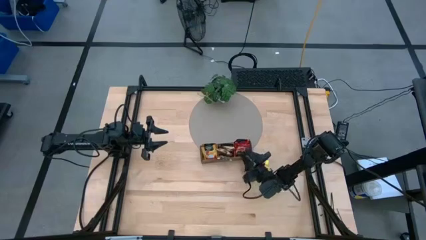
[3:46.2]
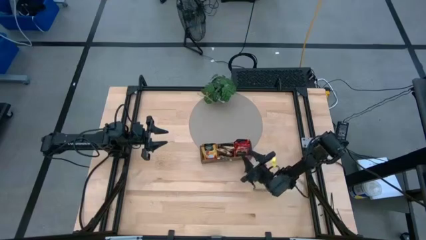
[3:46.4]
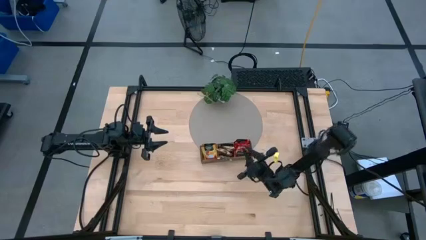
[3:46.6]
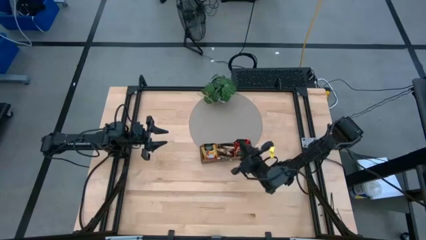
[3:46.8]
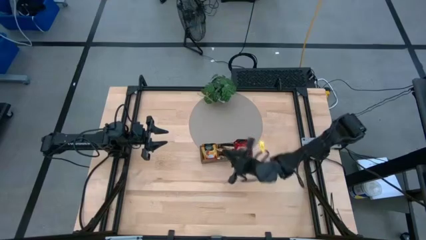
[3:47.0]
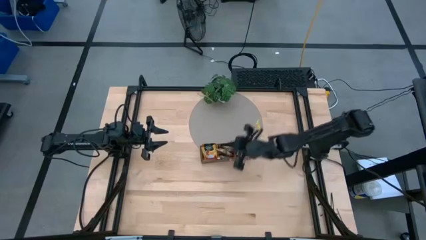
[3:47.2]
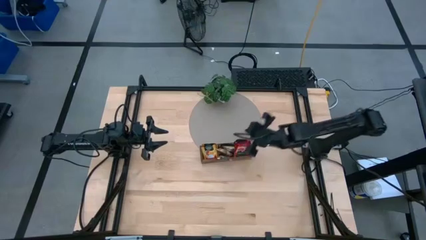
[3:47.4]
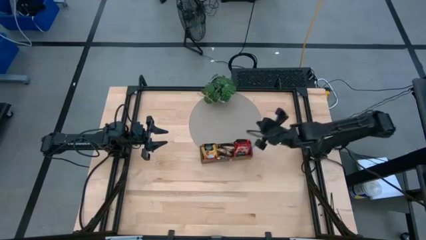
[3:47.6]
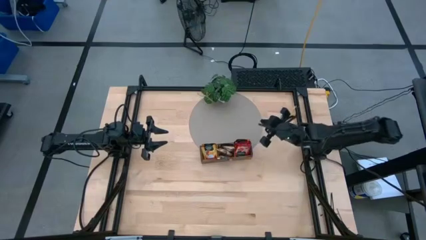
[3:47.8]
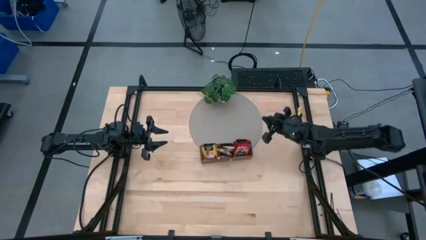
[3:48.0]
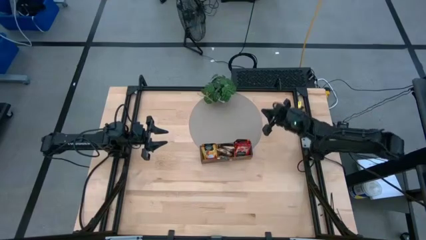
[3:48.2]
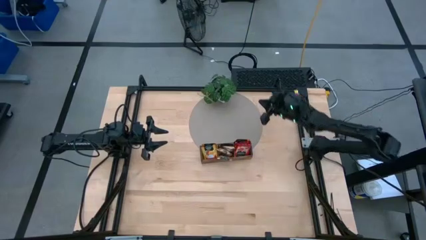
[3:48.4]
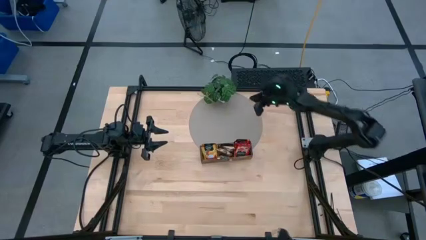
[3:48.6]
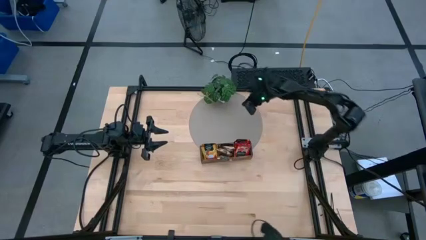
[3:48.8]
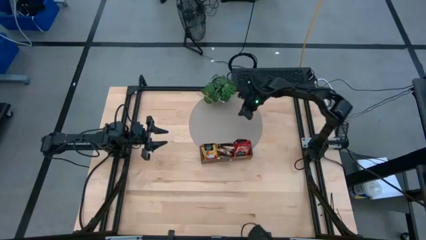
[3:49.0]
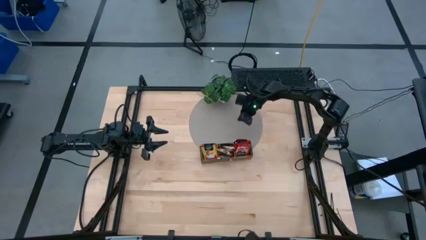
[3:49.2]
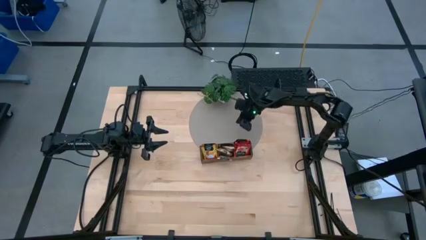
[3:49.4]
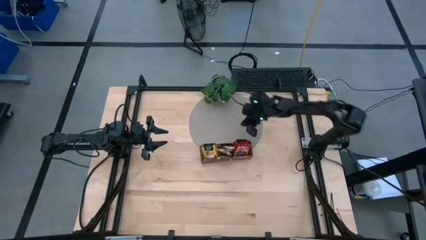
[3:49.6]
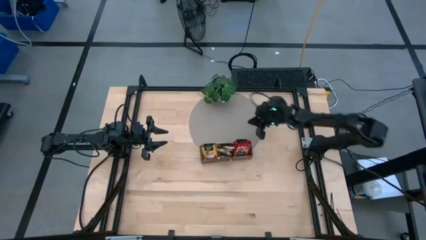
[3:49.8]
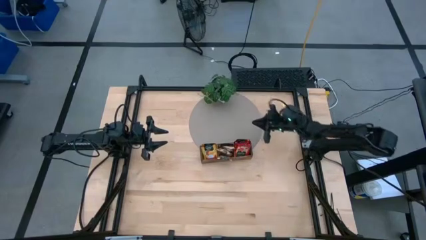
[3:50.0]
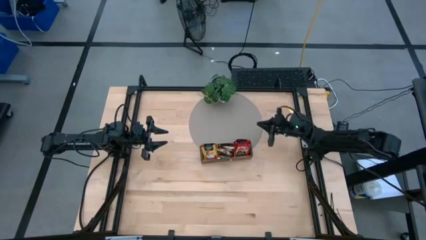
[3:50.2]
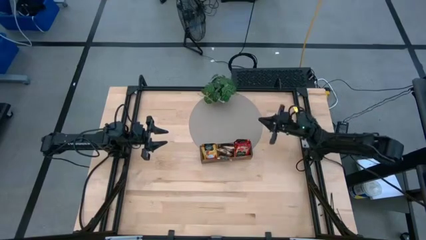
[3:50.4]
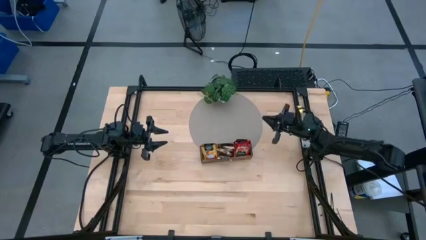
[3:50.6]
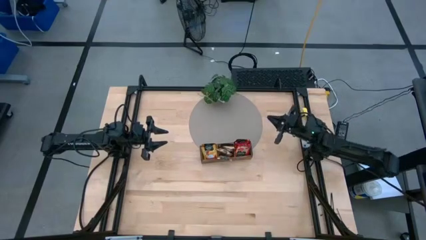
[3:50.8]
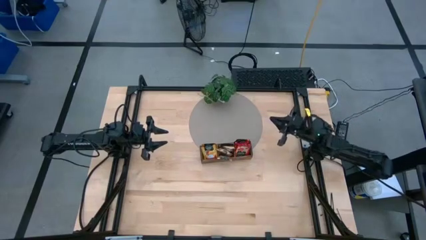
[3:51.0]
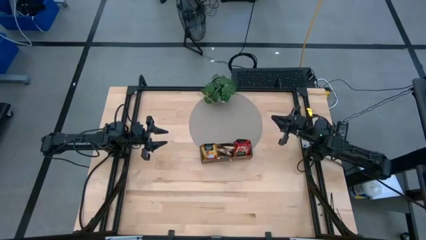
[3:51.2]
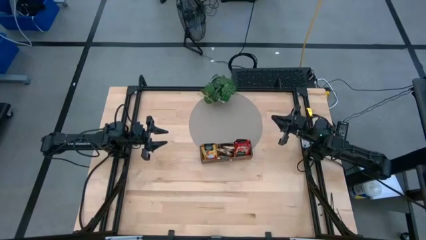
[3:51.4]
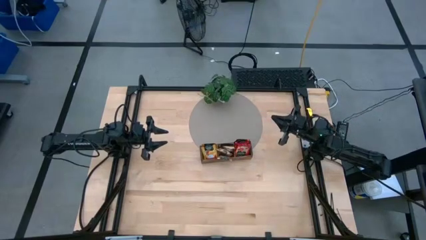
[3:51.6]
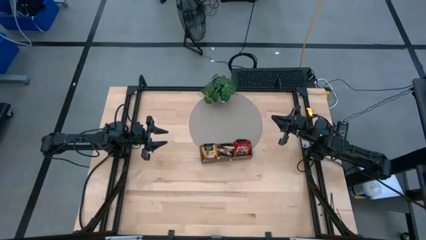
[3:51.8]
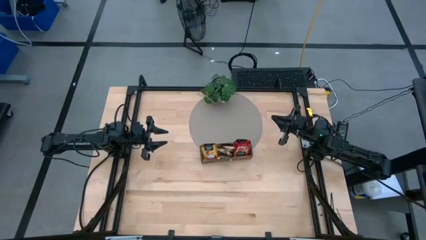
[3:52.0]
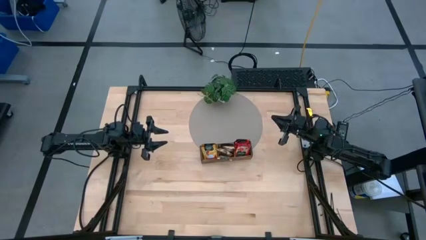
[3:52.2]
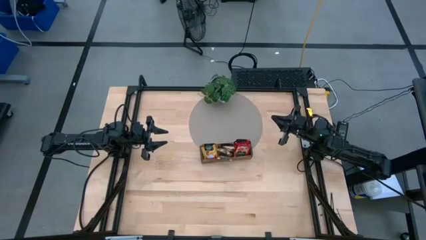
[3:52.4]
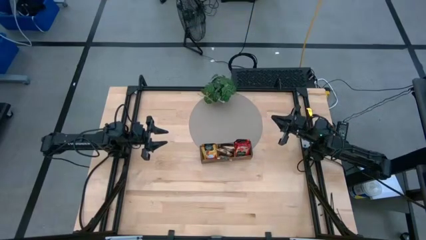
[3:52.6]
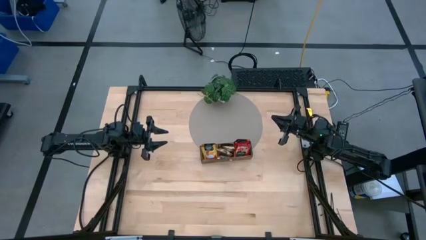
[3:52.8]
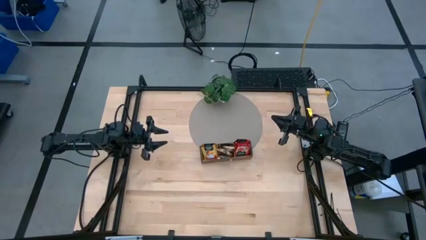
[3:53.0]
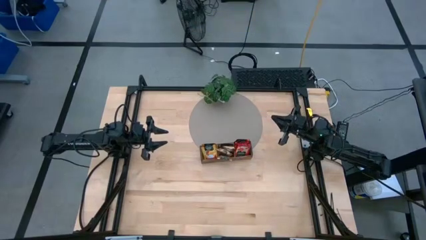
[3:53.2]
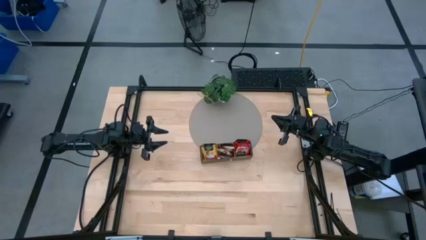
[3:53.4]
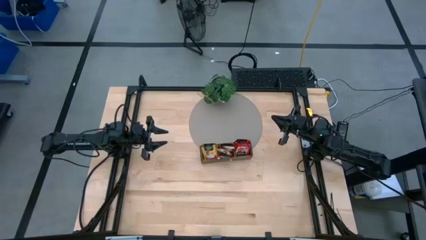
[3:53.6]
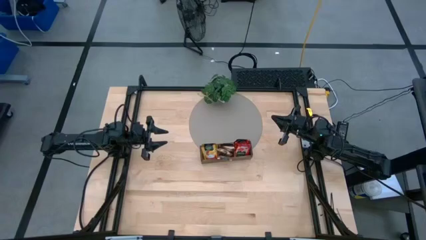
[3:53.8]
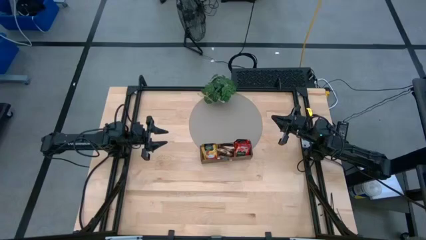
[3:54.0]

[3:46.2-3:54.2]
Task: Pick & Place Tea
Return to Home Position
